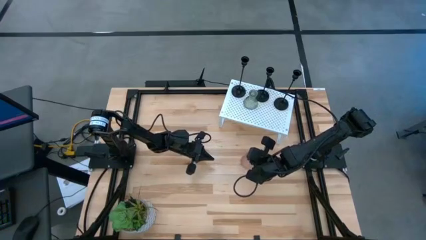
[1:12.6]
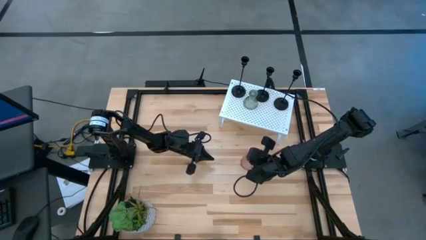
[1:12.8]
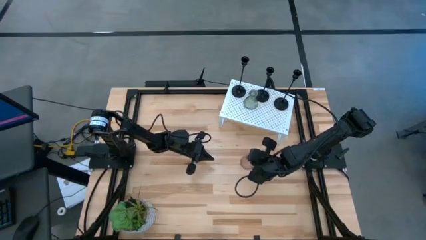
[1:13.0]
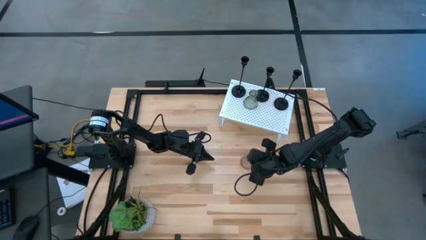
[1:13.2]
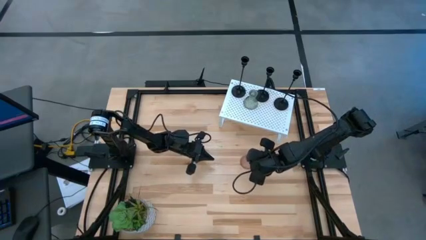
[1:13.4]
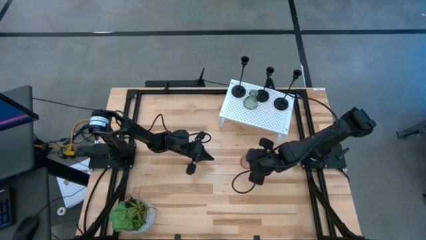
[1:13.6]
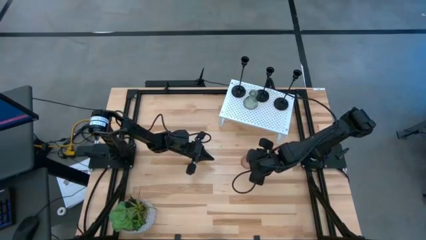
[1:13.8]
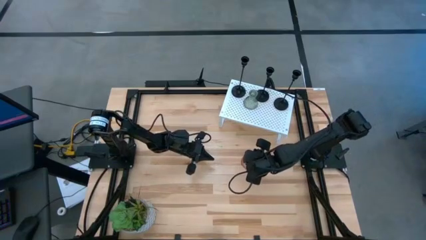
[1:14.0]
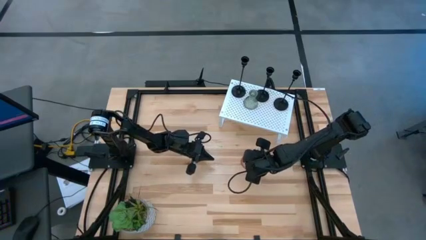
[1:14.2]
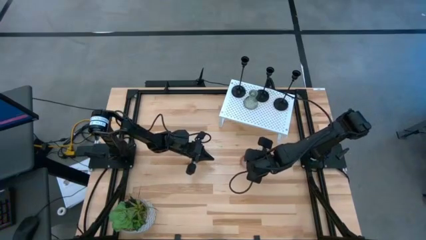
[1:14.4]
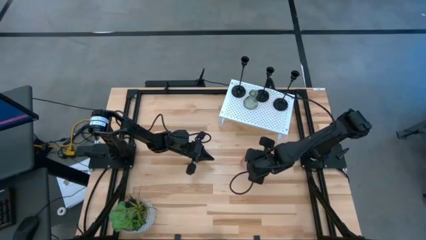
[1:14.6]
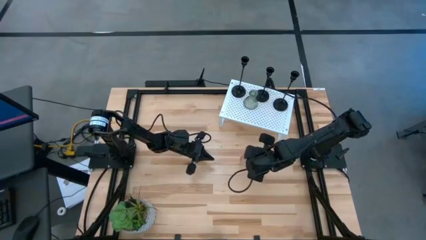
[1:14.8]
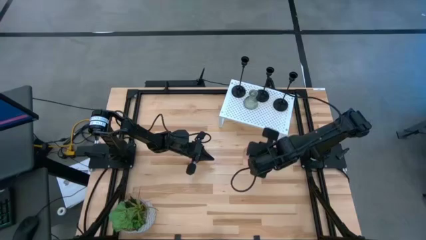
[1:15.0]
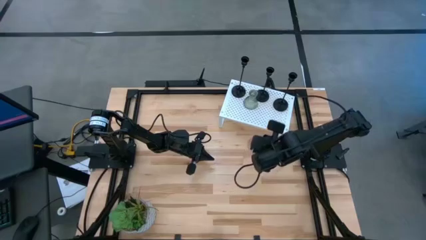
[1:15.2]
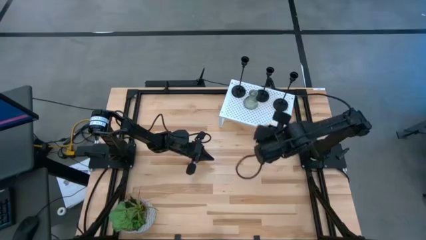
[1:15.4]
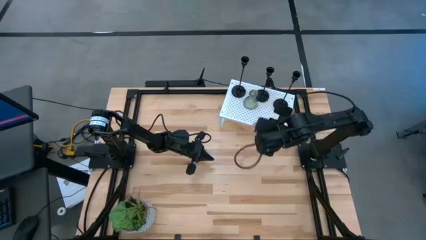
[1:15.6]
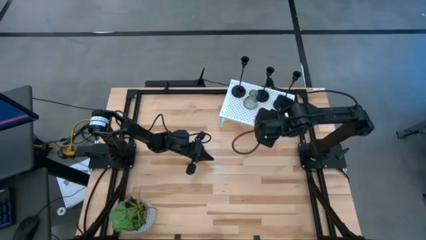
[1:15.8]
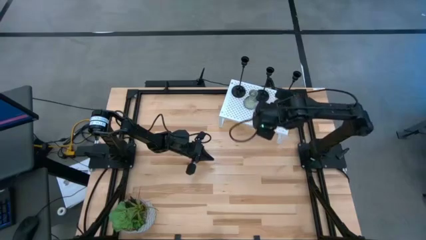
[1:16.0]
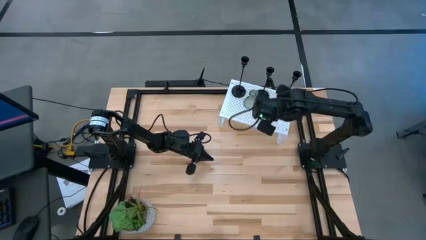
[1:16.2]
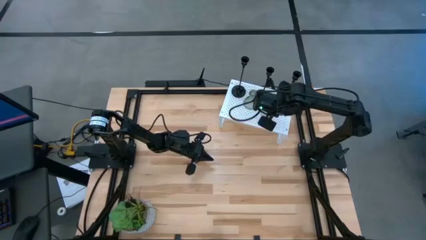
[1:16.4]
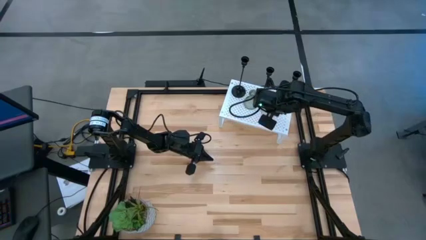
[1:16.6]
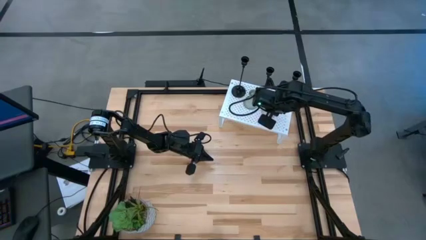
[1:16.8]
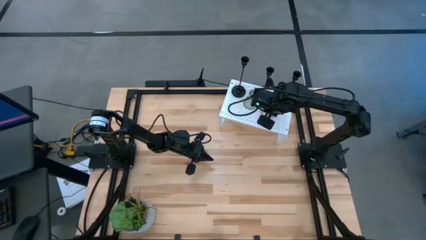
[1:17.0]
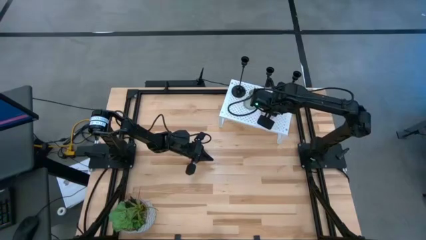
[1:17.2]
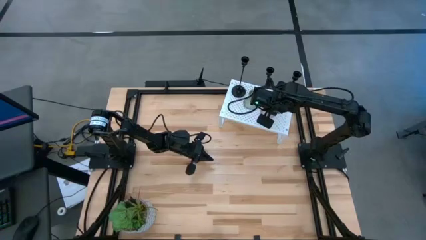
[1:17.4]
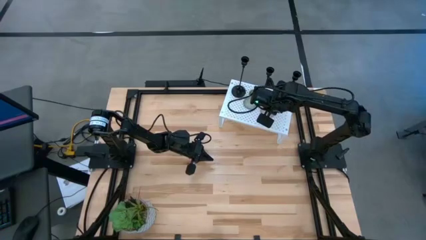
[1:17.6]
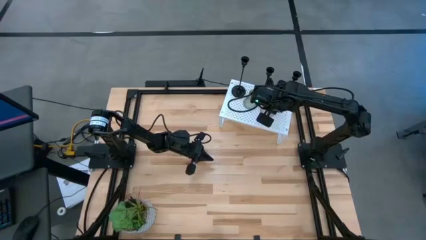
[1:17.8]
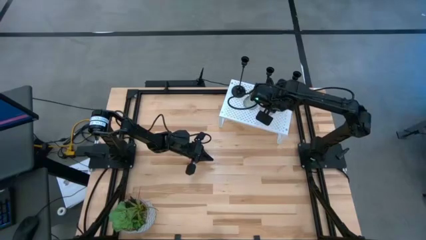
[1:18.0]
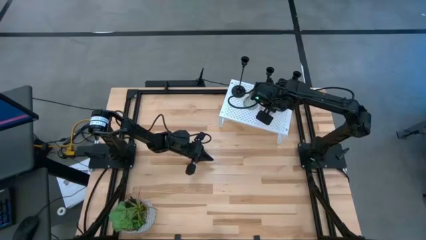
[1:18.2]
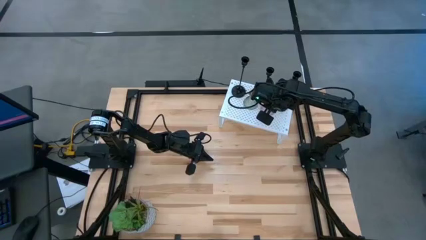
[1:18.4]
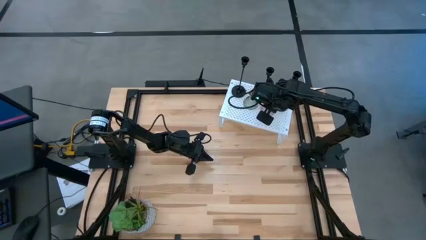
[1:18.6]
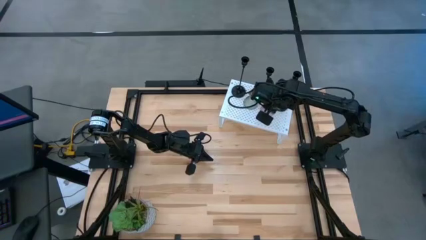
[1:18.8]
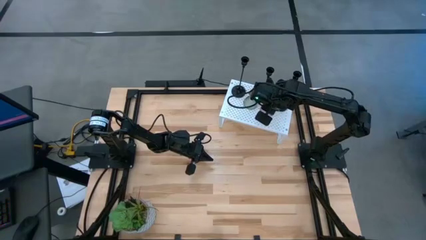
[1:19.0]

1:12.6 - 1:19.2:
Task: Pick & Place candle stick holders
Put the pink candle holder on the shelf

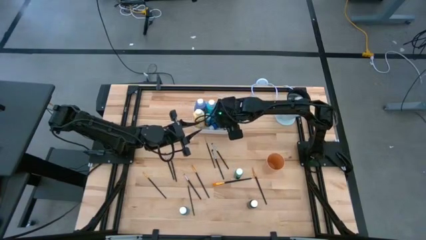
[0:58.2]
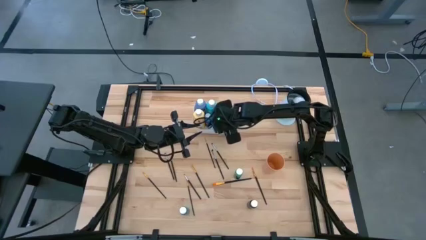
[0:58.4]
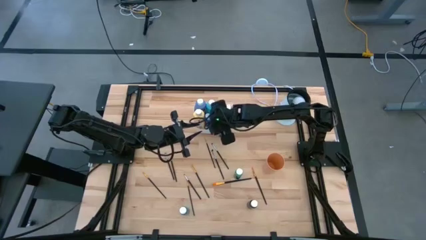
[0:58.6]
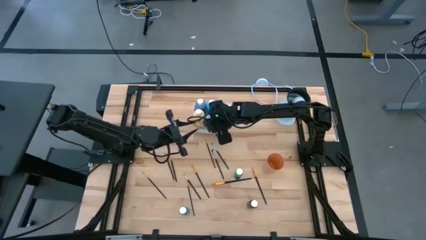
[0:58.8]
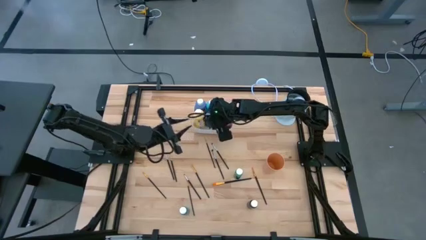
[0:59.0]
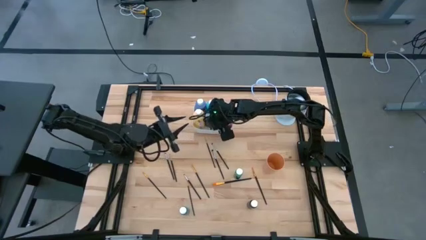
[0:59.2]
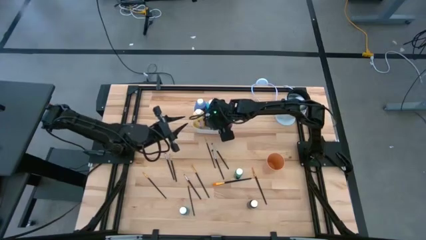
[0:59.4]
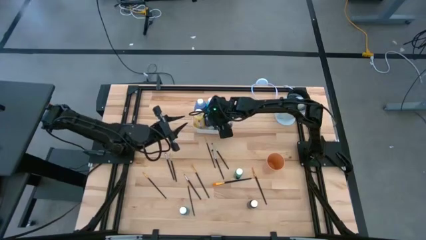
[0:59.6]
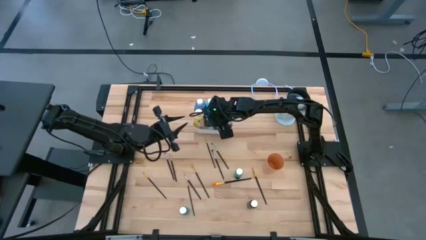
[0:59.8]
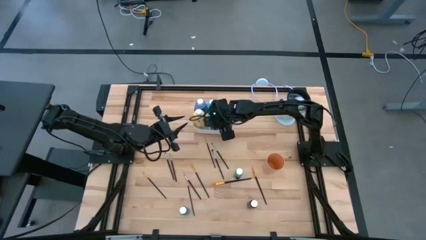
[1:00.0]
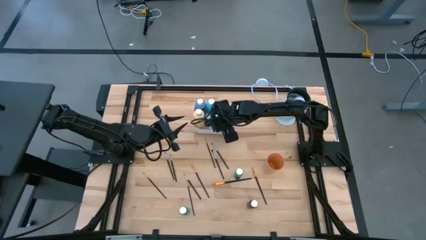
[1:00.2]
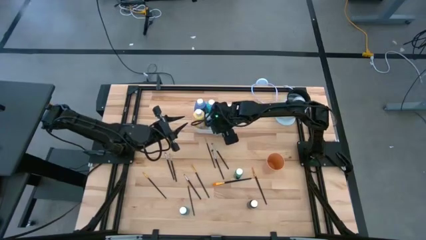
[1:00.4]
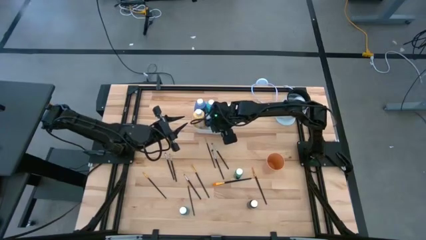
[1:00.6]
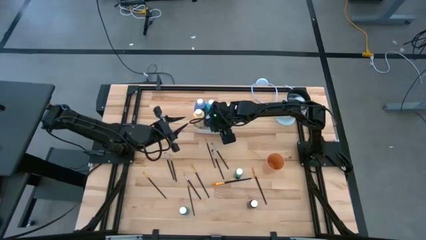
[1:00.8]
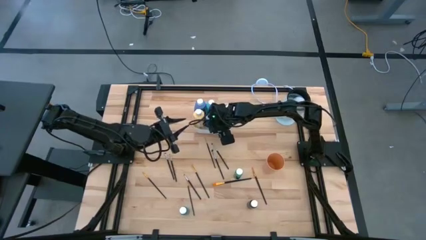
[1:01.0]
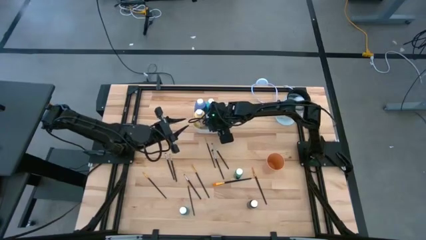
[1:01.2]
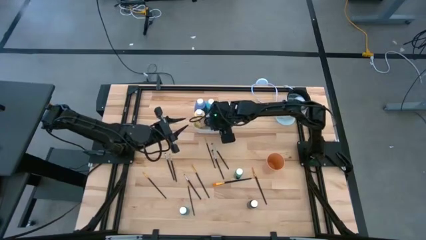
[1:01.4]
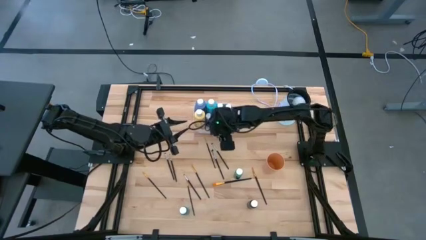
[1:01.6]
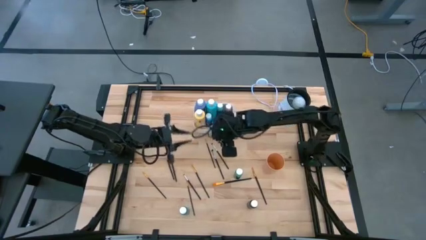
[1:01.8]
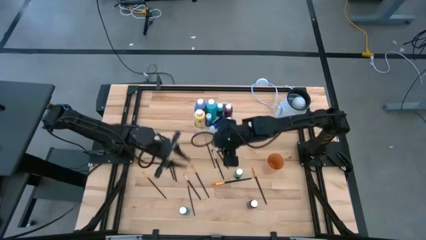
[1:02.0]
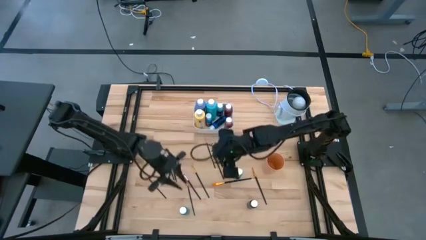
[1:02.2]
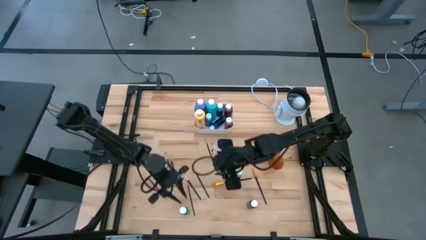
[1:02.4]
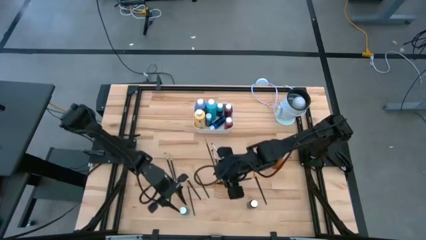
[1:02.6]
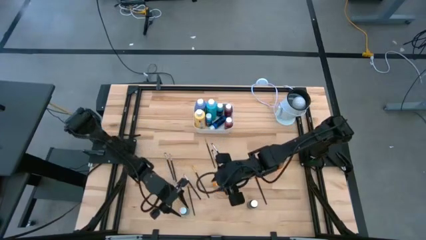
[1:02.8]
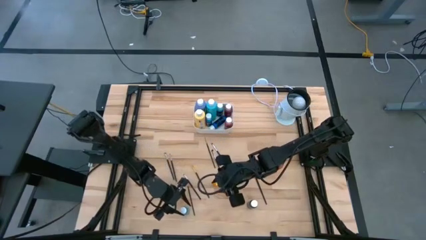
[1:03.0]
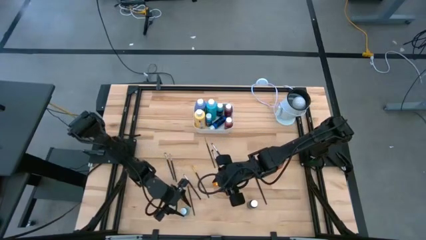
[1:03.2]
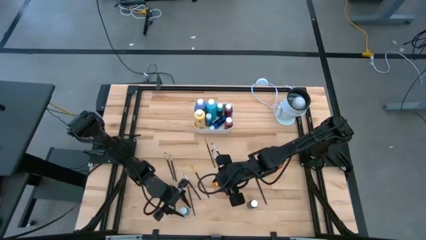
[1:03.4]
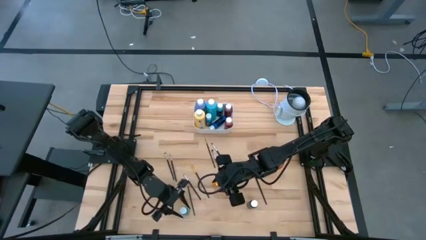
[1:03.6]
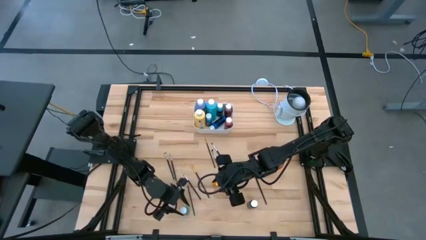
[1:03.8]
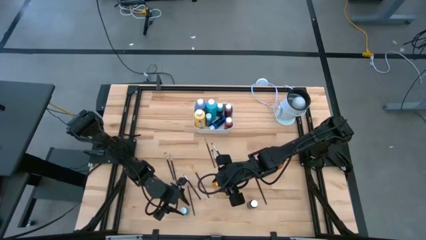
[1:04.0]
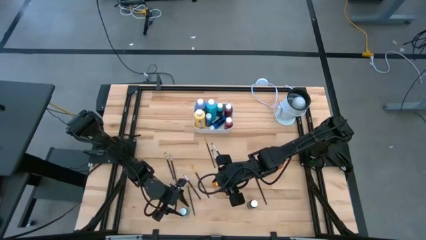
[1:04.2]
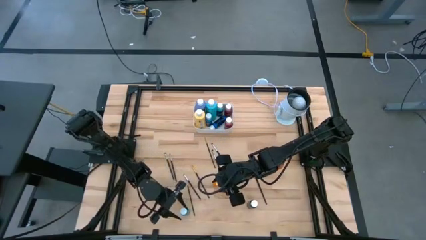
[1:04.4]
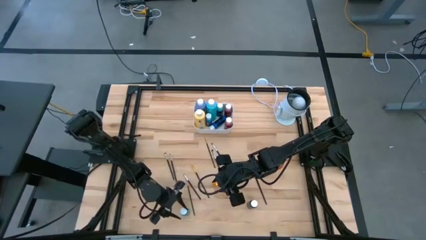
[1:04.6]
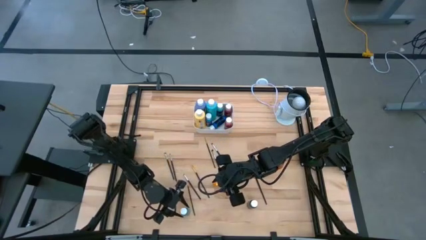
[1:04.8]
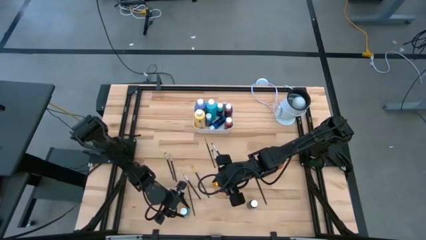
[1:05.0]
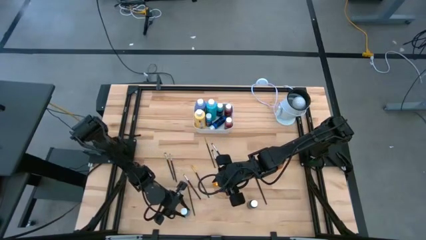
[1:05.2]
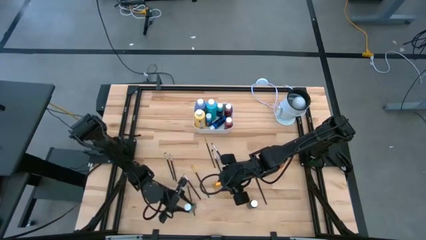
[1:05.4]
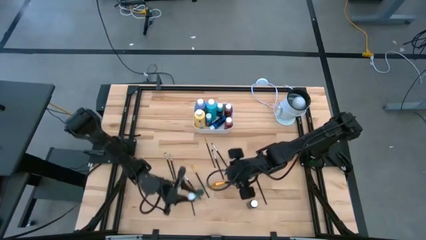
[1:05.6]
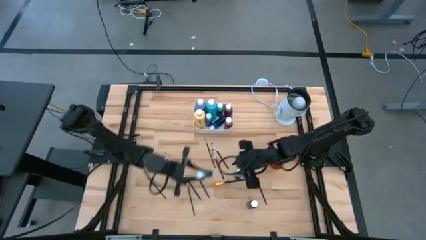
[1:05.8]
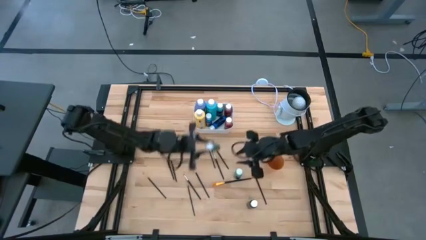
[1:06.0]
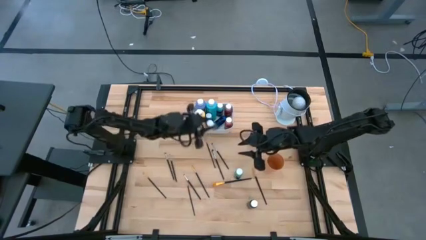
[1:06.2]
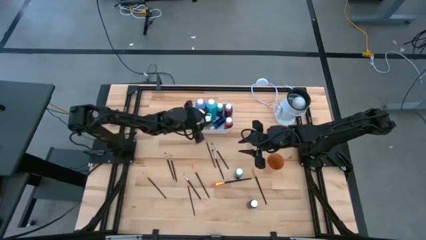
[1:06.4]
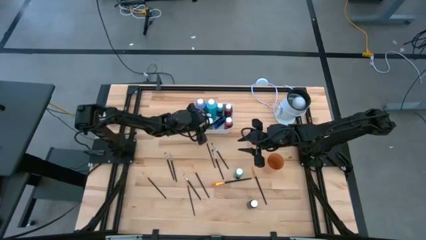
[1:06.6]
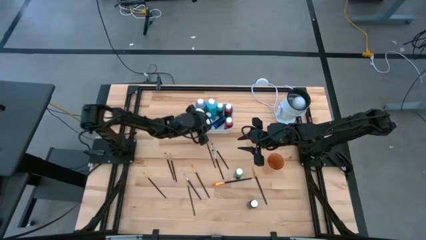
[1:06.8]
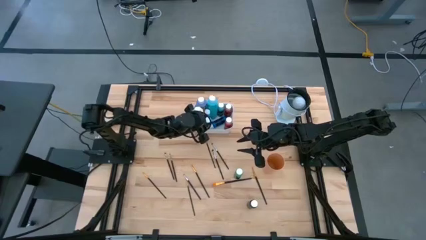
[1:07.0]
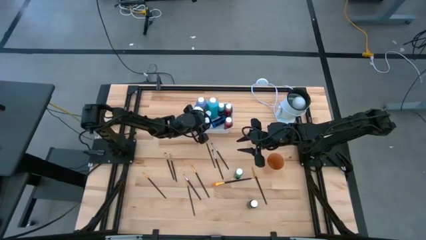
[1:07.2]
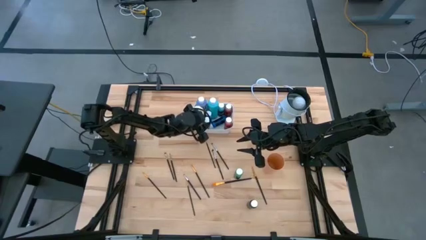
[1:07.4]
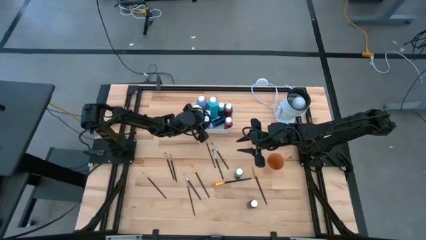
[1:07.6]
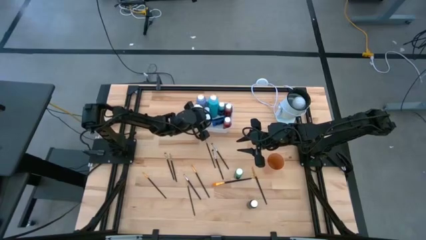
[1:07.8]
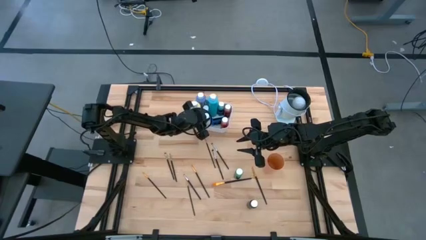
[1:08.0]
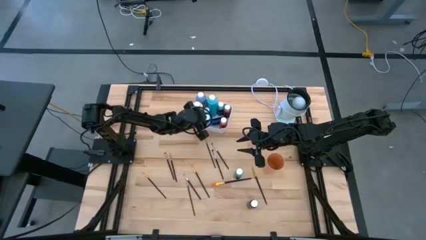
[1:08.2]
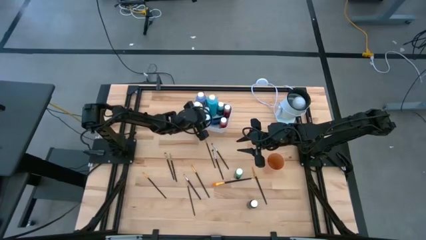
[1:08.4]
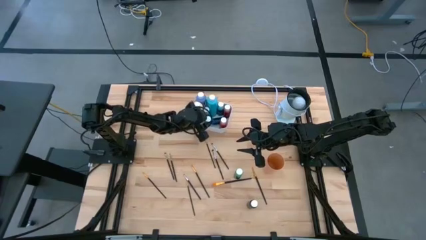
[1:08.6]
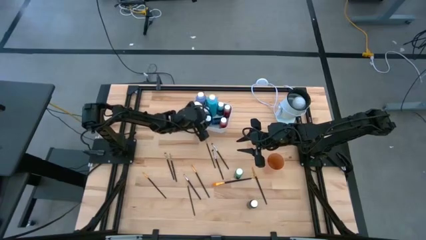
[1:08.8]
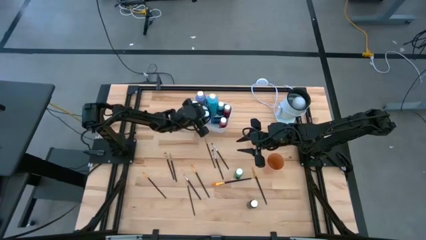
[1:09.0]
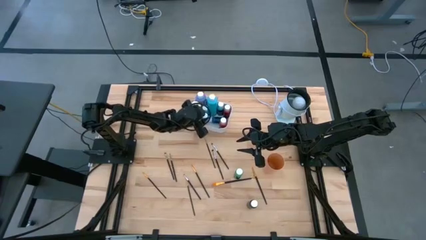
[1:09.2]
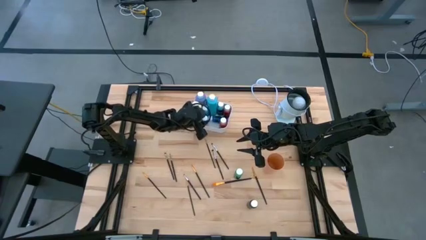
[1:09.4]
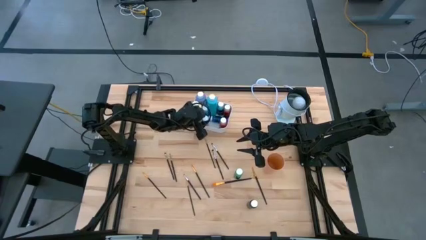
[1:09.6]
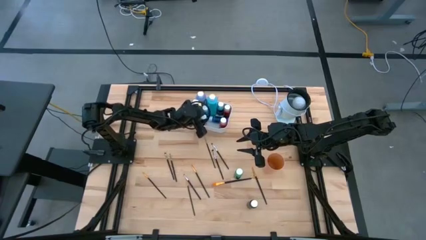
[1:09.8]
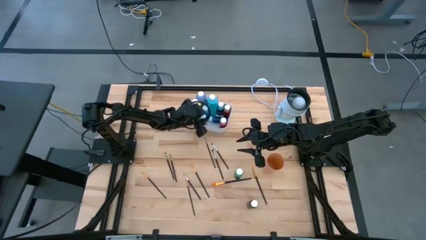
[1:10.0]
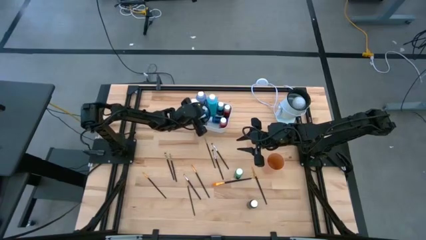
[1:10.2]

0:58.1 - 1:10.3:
Task: Pick & Place Paint Supplies
Put the dark green paint bottle into the white bin
